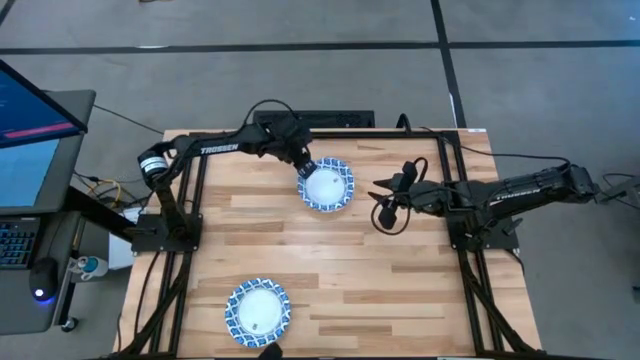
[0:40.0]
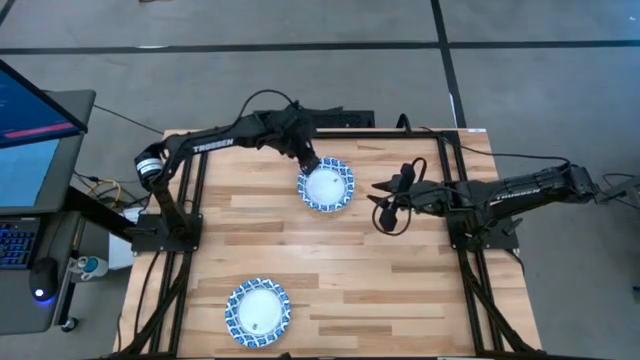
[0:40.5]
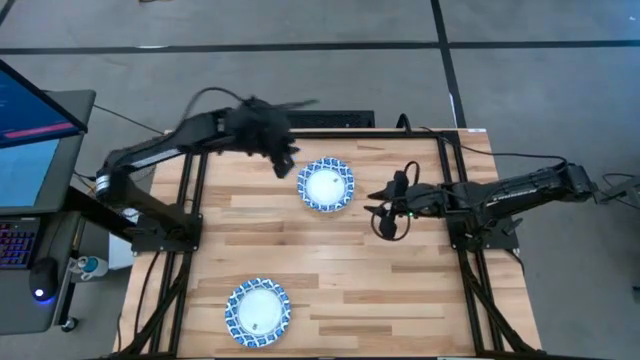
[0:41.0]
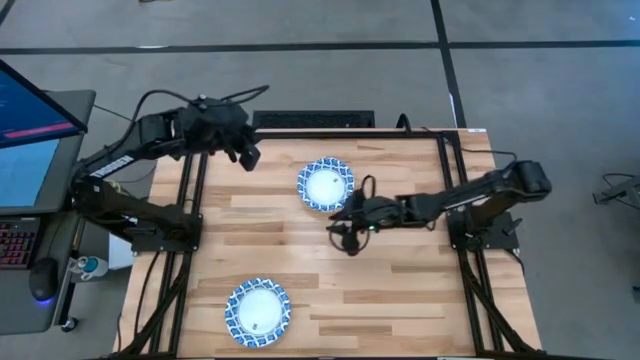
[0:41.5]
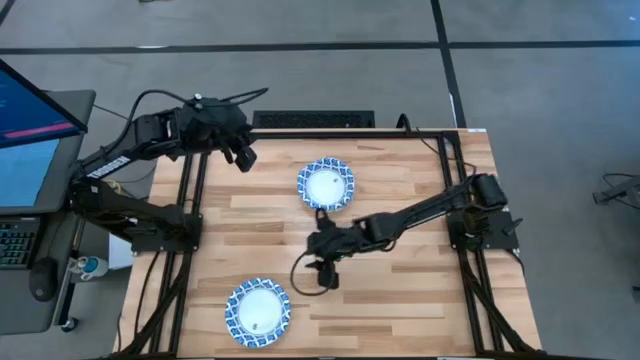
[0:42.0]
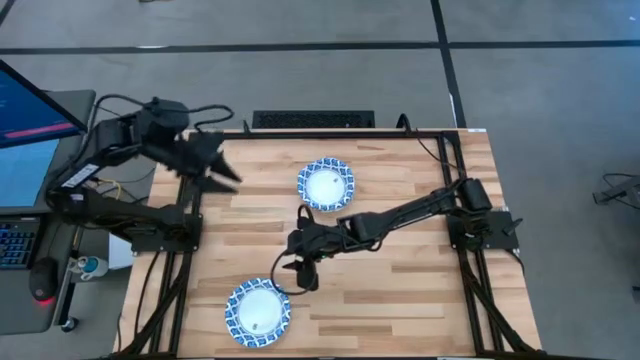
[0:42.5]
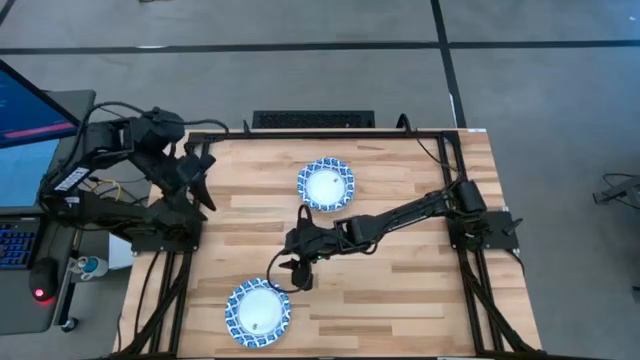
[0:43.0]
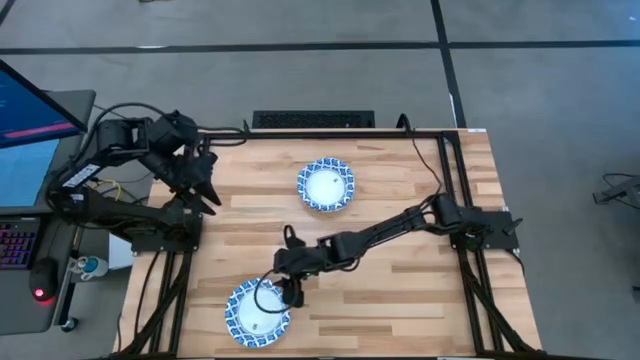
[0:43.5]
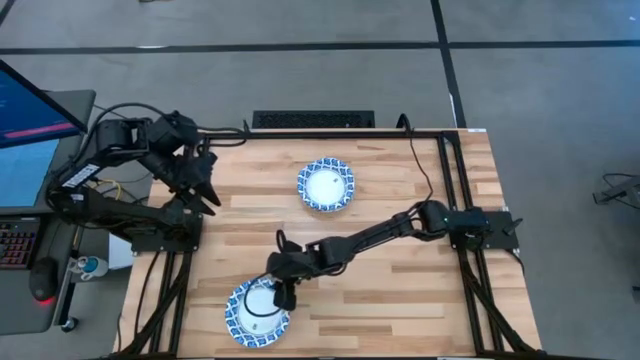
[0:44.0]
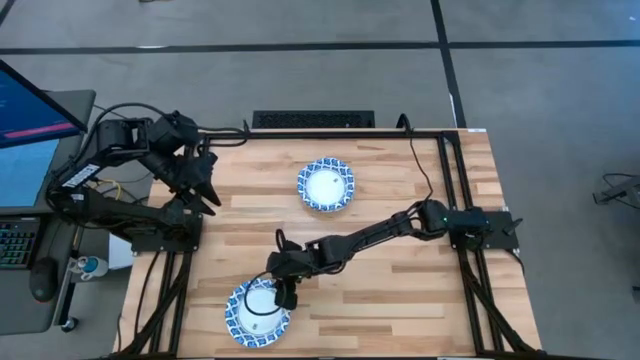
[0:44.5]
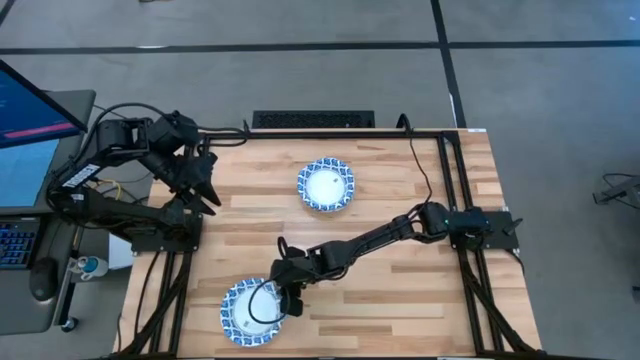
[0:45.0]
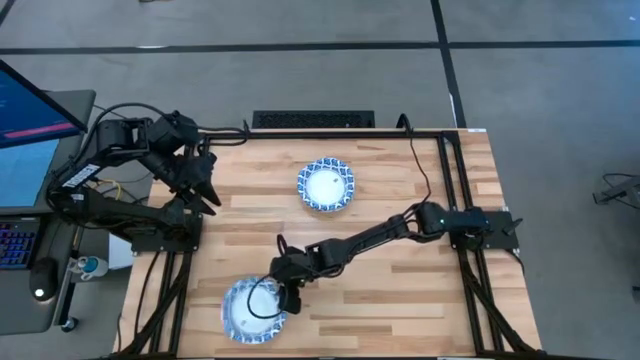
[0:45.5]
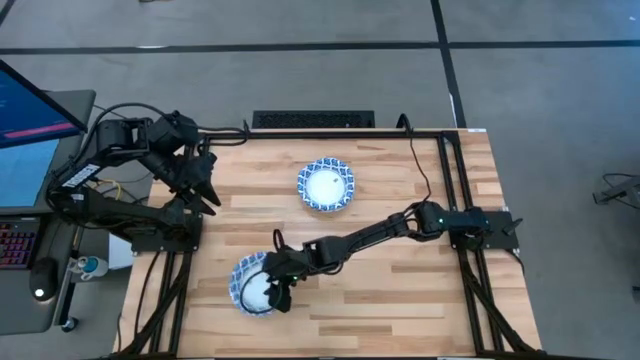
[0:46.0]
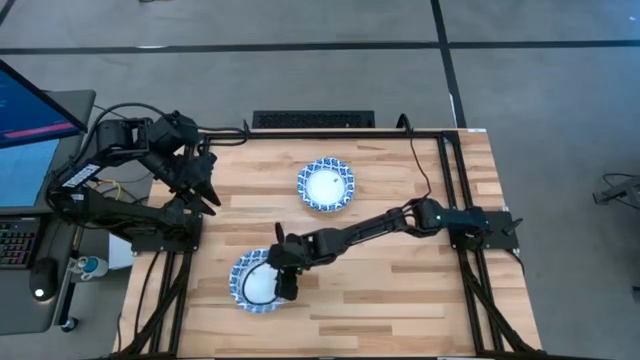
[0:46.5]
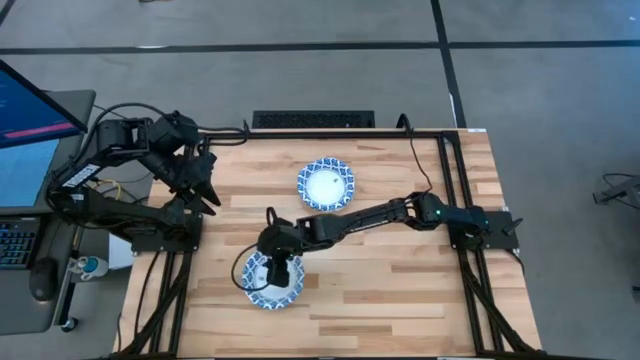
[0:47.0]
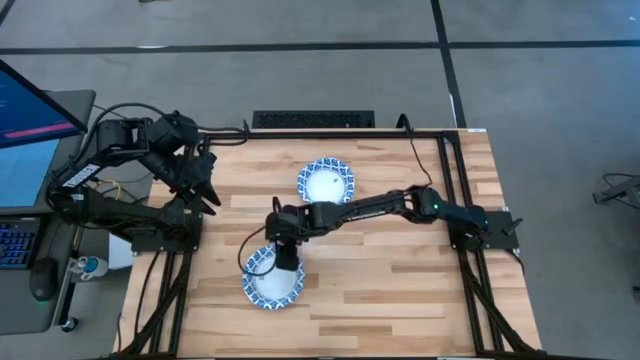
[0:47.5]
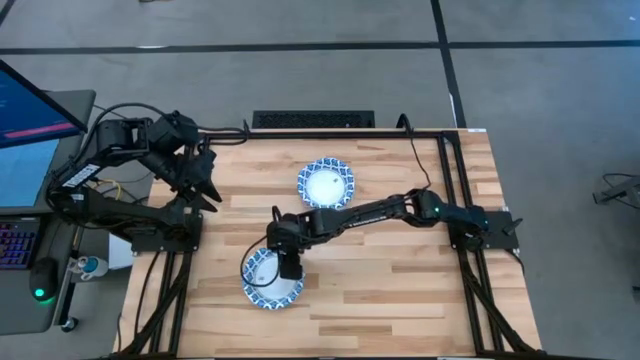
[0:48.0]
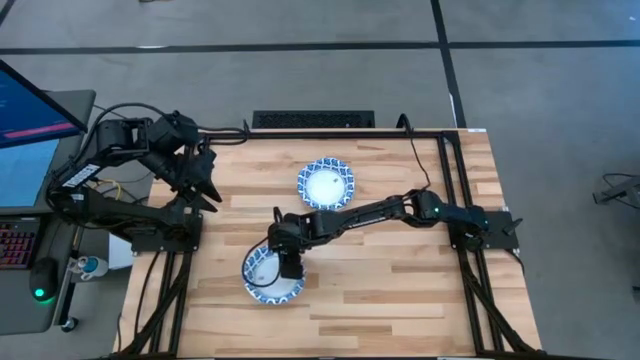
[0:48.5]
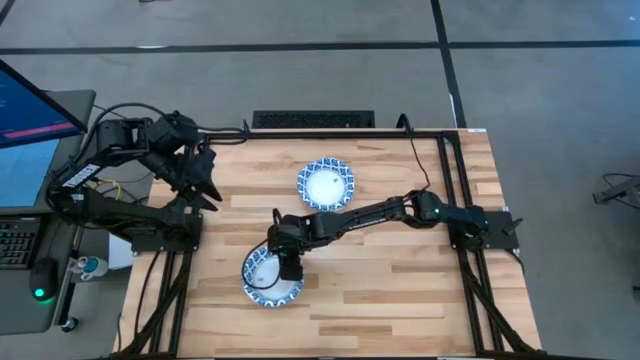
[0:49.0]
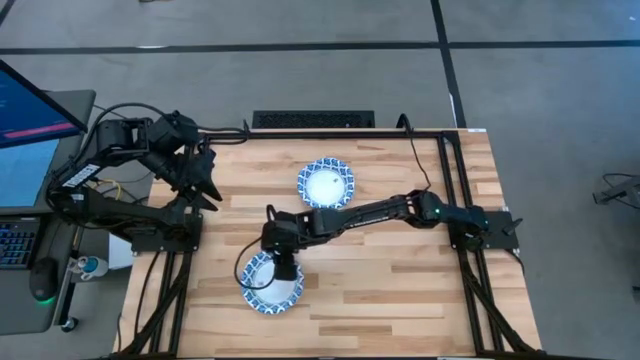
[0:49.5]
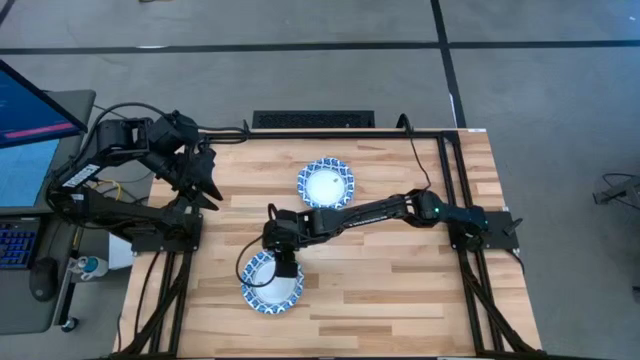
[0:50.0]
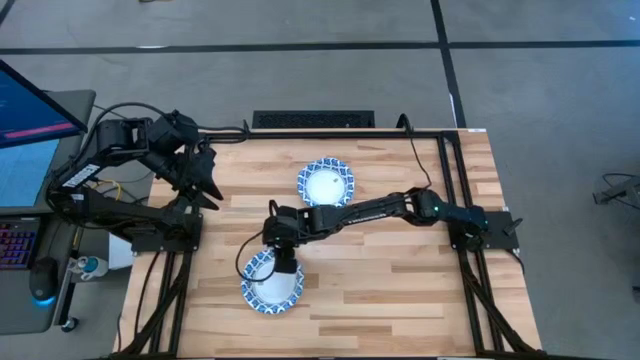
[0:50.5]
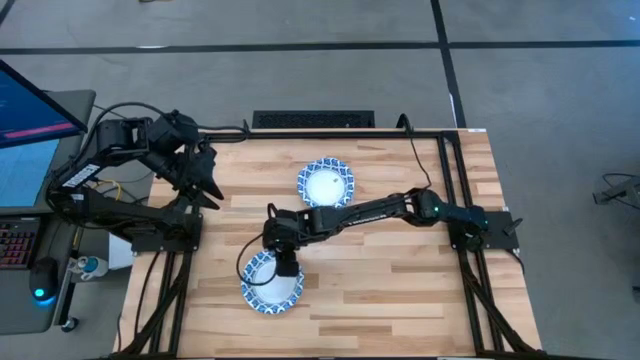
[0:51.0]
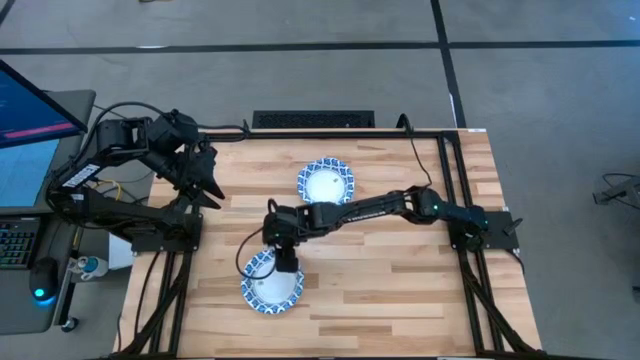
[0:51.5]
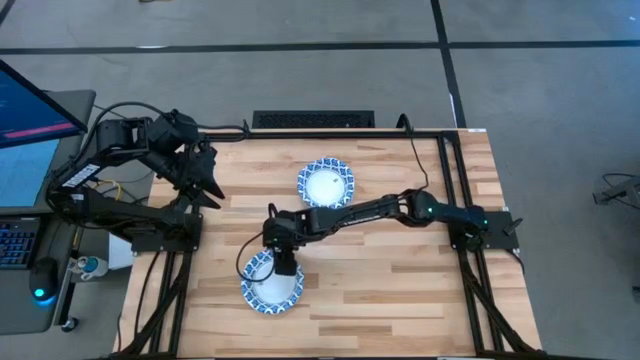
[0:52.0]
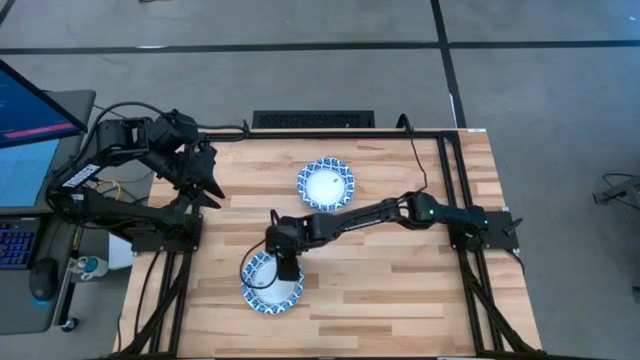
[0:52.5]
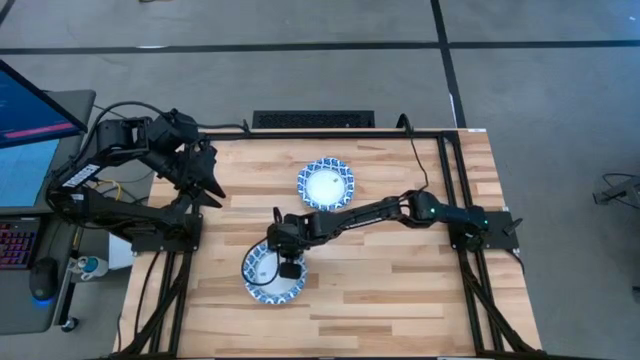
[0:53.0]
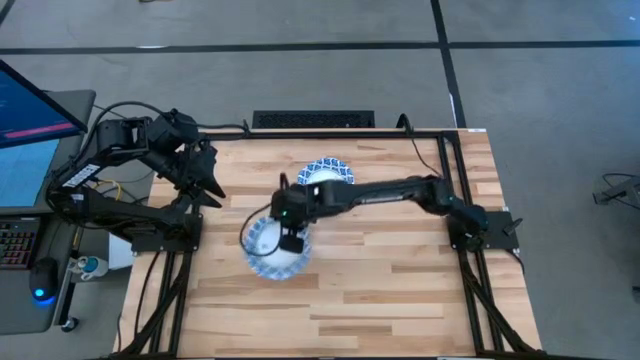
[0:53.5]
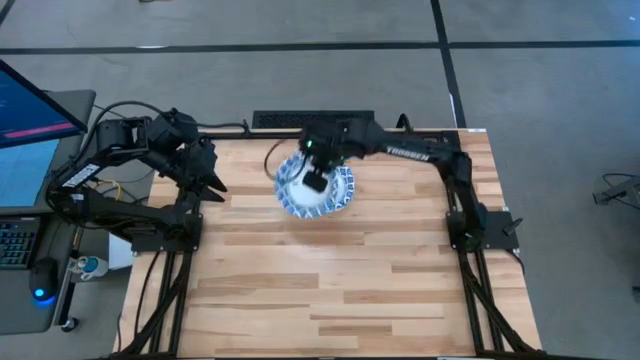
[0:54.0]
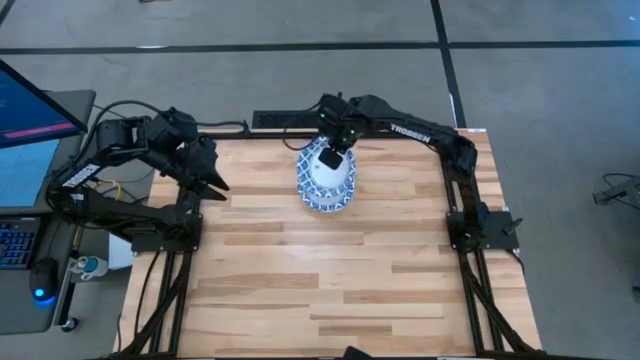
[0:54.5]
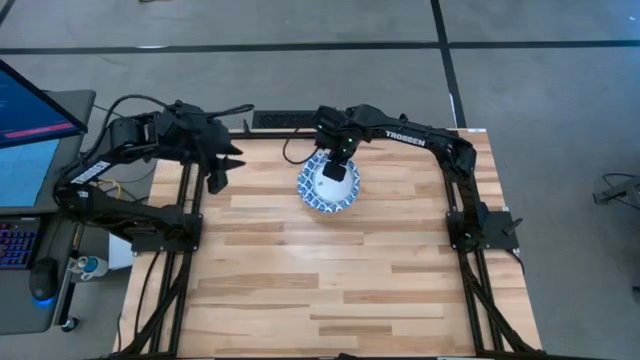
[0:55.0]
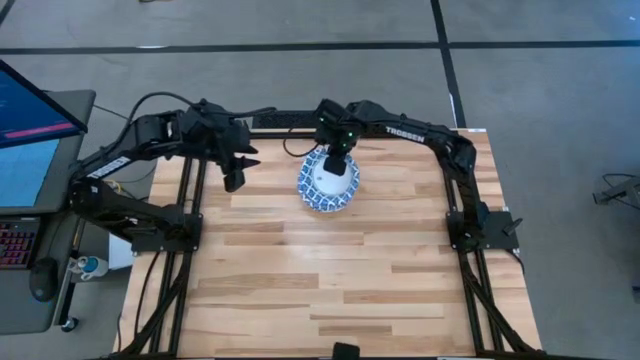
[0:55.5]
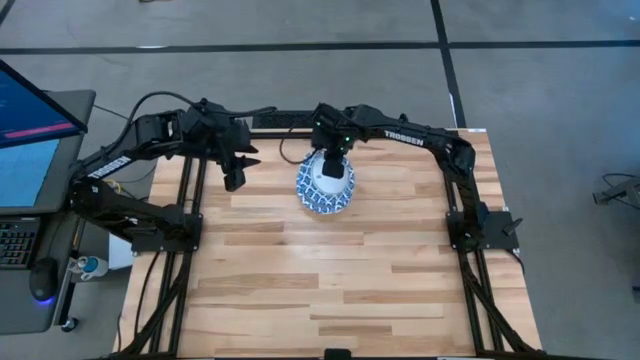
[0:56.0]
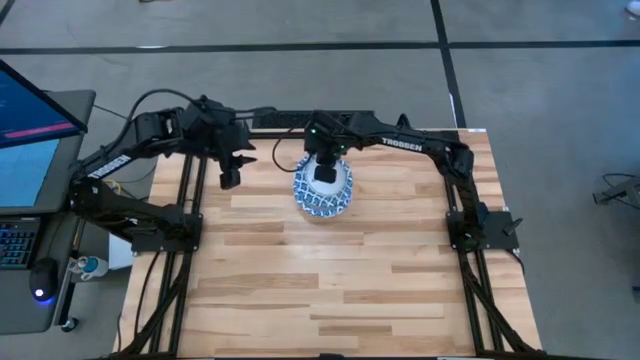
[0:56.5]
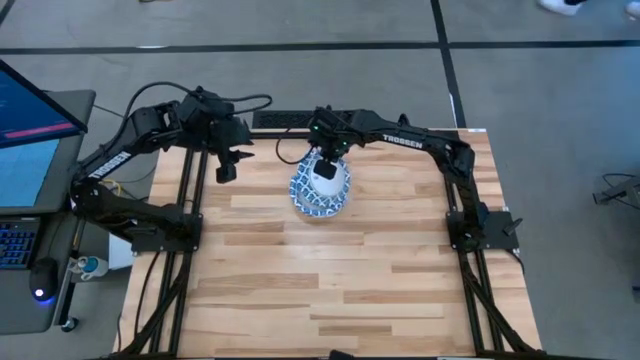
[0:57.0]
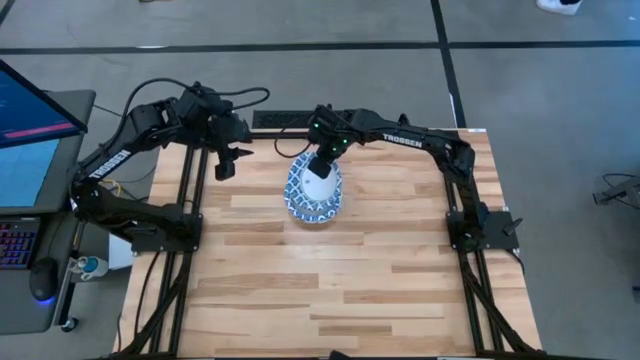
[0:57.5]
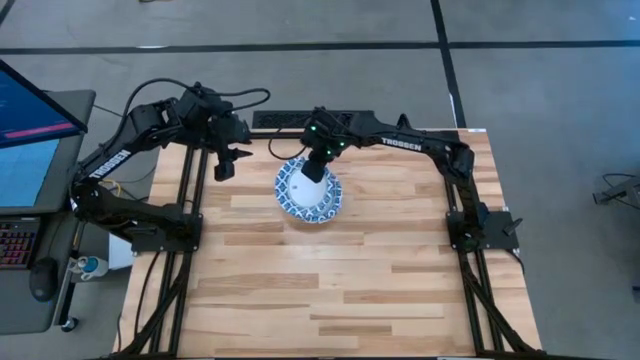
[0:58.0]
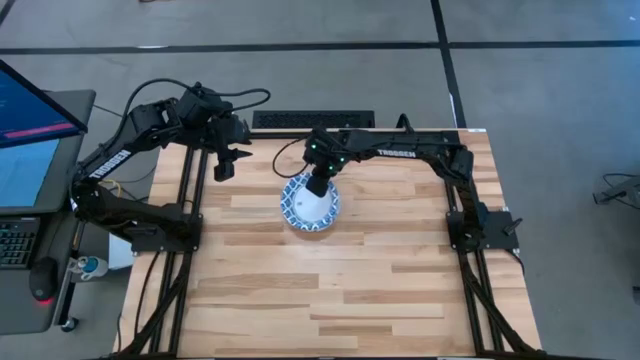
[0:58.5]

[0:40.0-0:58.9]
Task: Nest bowls inside each other
Stack the white bowl on top of the other white bowl

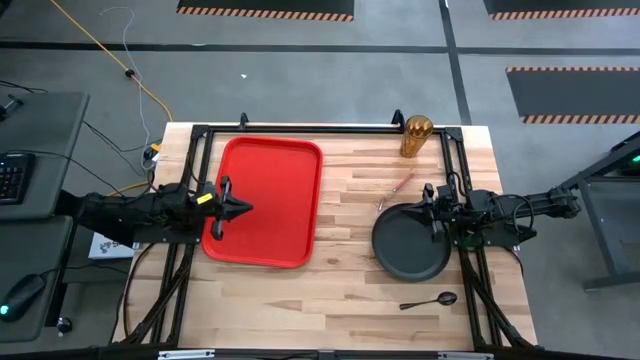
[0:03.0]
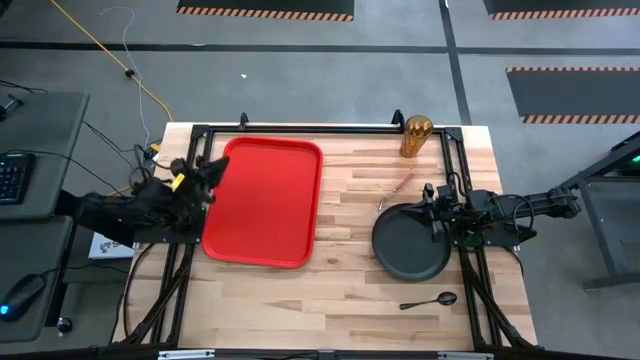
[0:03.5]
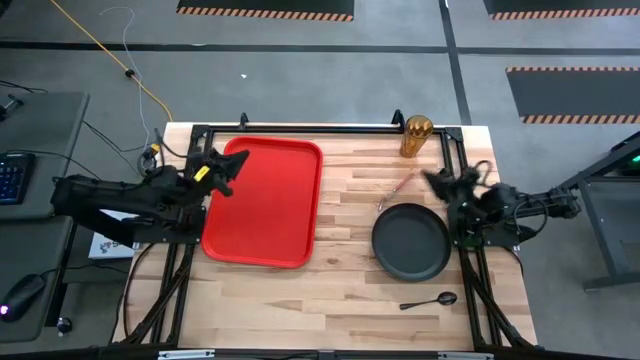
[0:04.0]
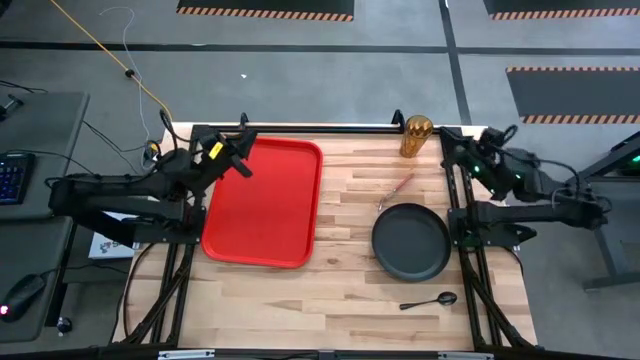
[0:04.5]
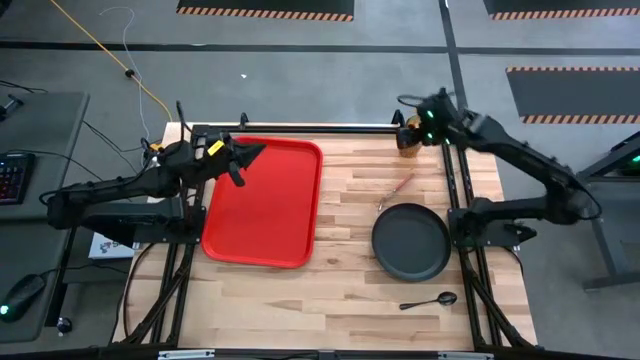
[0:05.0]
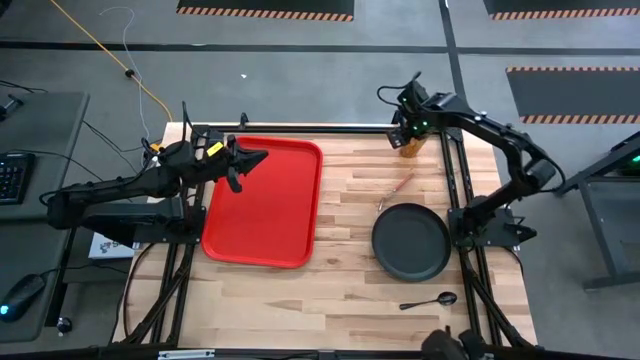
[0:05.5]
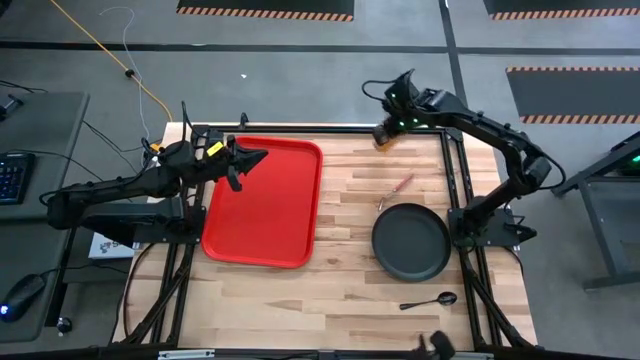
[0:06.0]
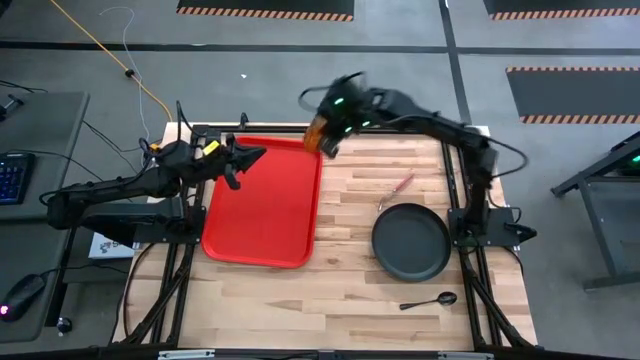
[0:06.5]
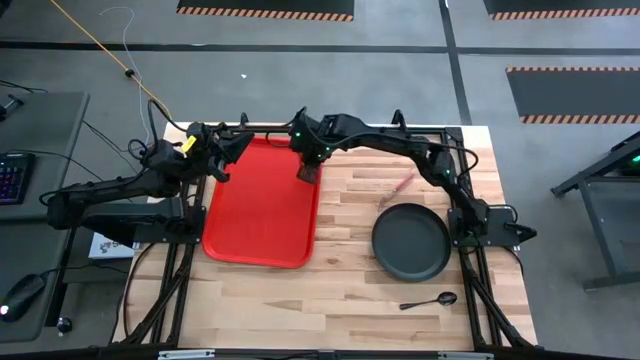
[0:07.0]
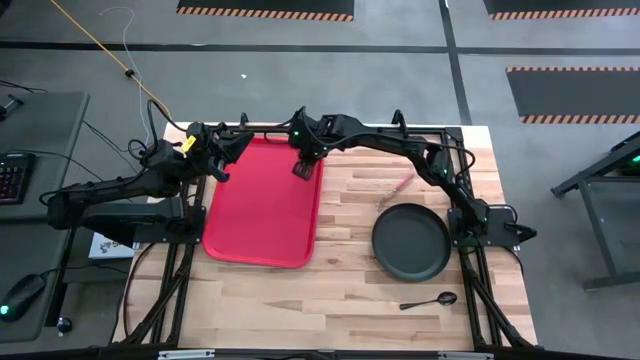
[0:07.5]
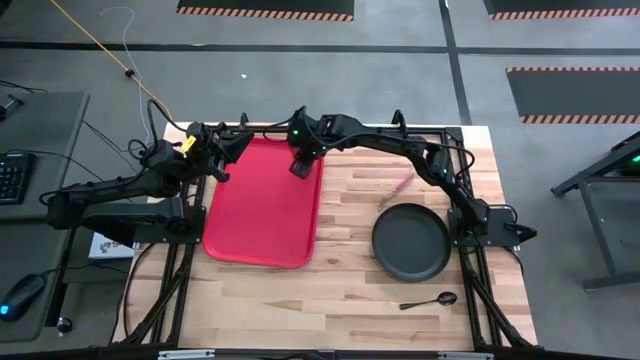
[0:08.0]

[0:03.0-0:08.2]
Task: Pick and place plate/cup/fork/spoon on tray
Put the brown cup on the red tray
